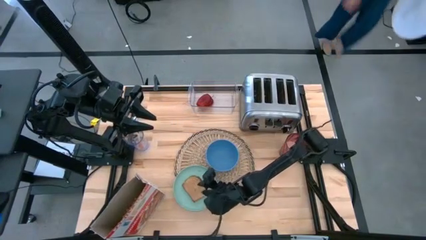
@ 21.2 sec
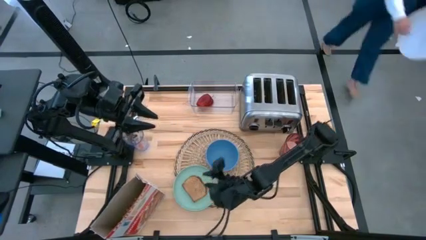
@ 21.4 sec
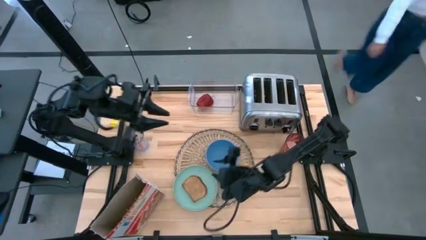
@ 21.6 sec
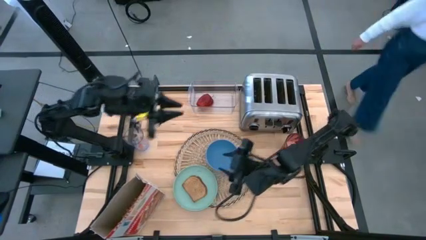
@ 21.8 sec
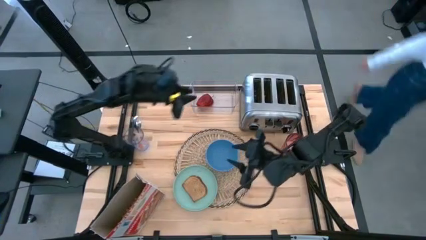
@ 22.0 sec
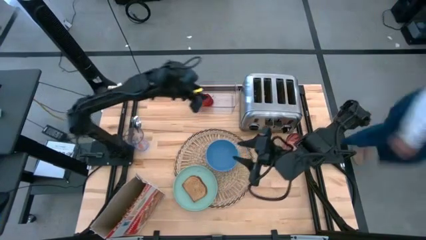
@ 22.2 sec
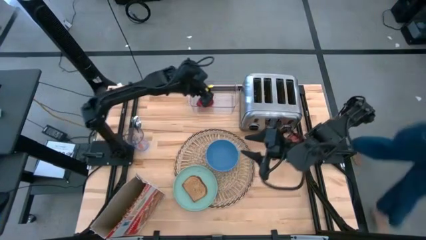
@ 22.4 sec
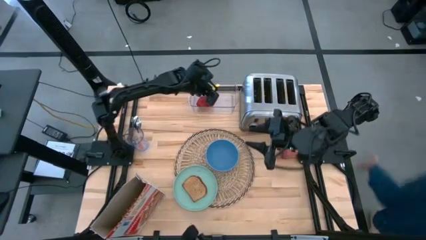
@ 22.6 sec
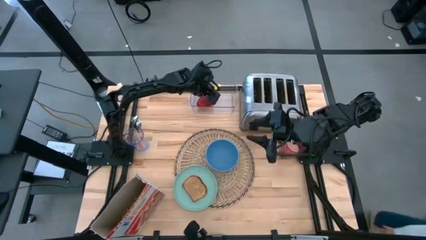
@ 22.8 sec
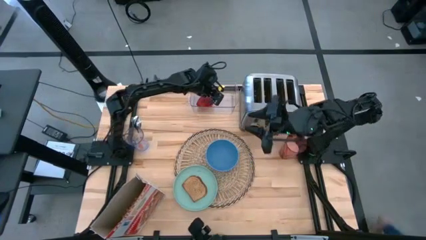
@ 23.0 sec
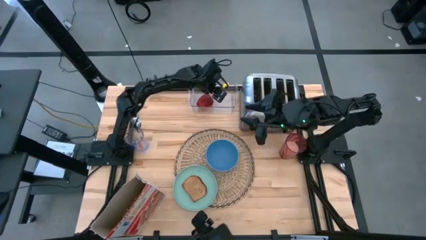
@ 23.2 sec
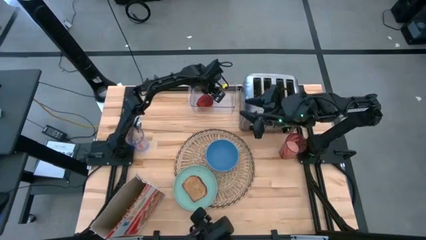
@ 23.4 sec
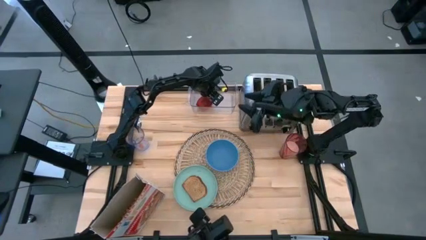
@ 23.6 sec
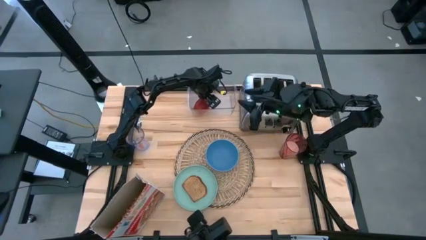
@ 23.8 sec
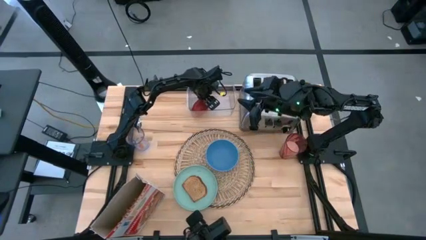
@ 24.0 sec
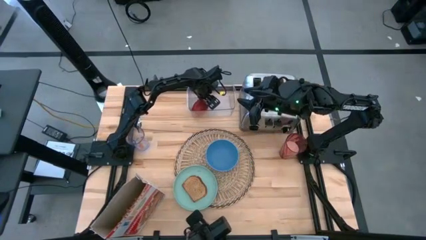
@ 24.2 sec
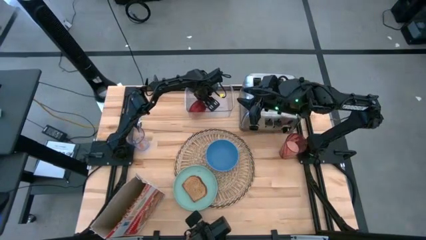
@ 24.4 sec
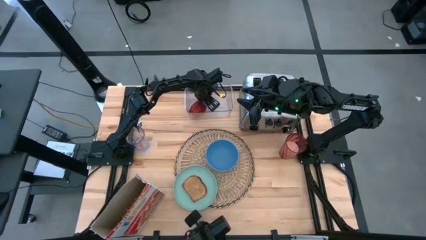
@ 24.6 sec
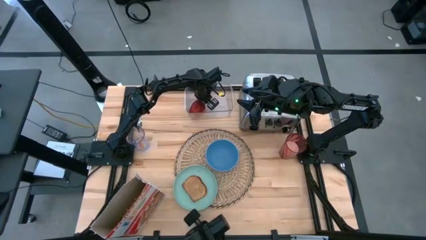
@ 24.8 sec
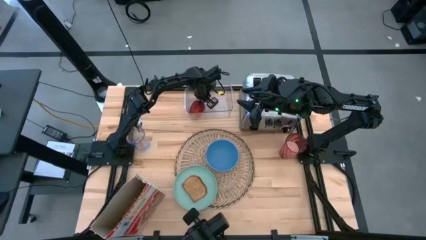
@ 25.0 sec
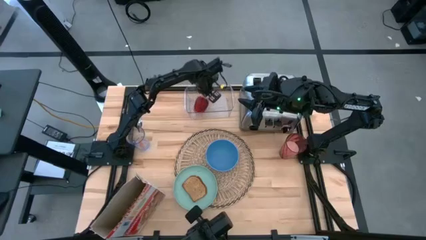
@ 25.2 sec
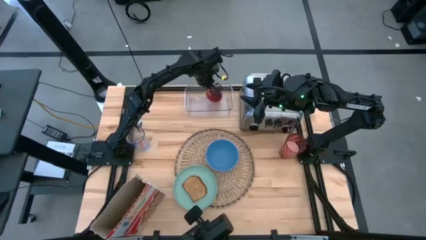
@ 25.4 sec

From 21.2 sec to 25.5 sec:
Task: Arrange a breakfast setting
Put the apple on the brown table mat to the left of the blue bowl

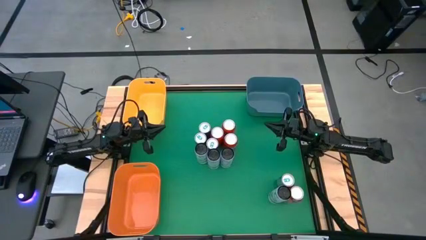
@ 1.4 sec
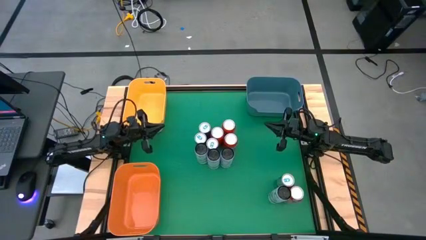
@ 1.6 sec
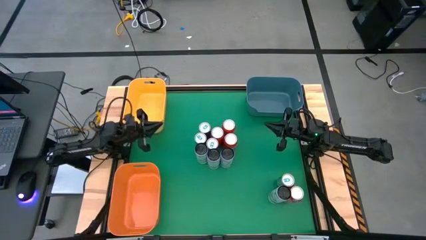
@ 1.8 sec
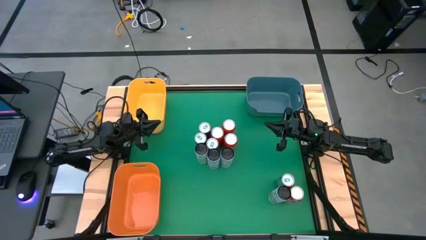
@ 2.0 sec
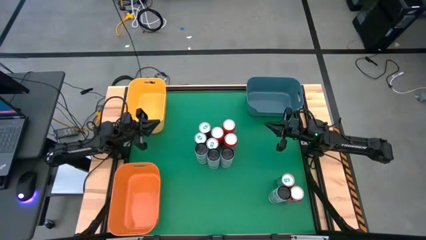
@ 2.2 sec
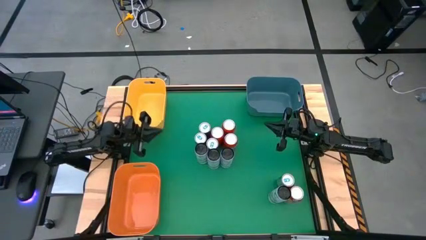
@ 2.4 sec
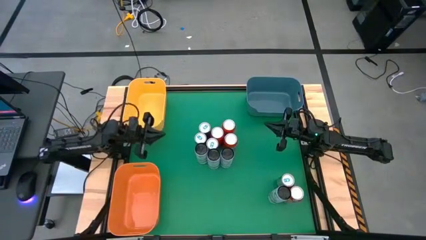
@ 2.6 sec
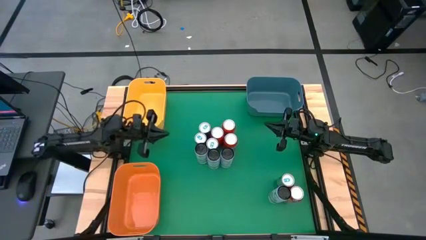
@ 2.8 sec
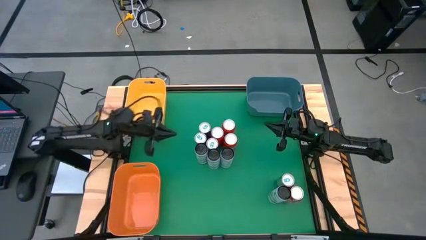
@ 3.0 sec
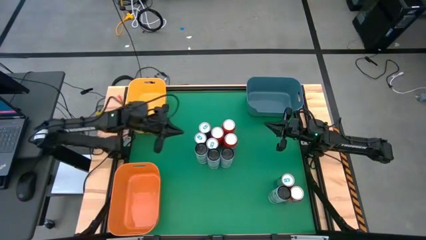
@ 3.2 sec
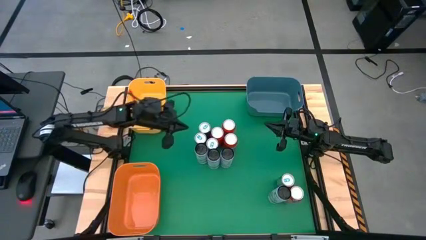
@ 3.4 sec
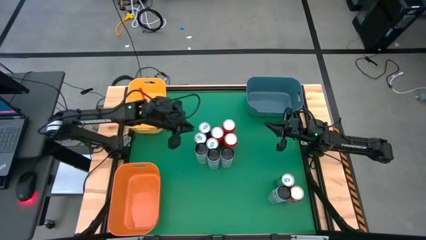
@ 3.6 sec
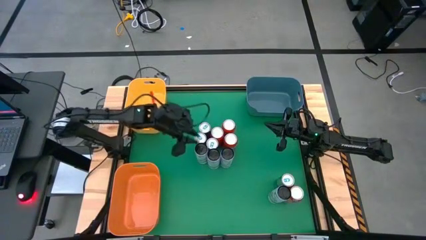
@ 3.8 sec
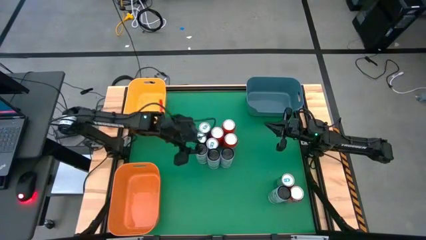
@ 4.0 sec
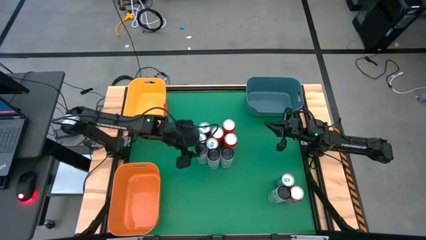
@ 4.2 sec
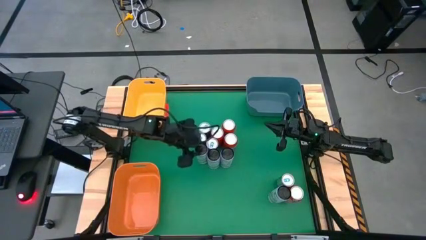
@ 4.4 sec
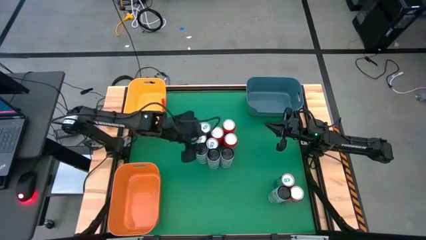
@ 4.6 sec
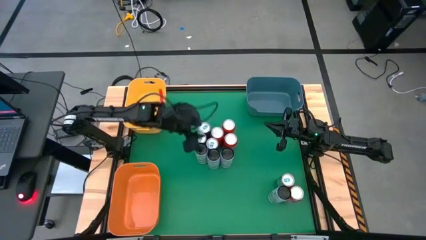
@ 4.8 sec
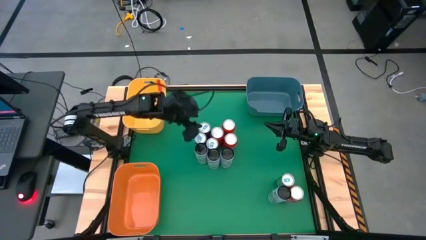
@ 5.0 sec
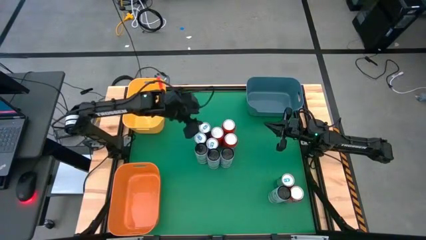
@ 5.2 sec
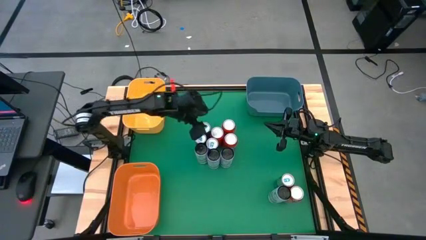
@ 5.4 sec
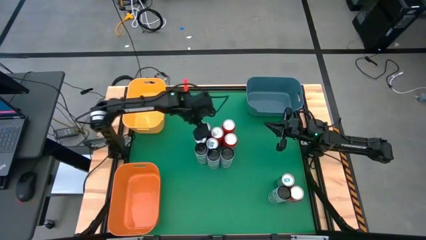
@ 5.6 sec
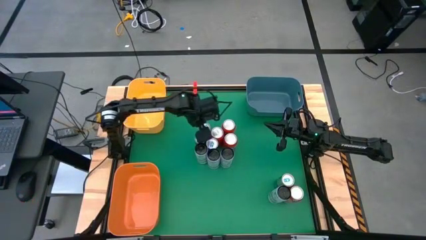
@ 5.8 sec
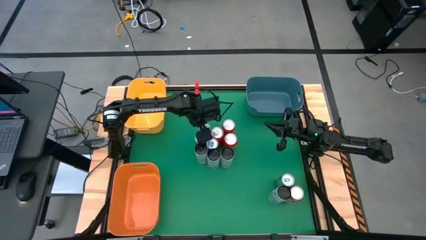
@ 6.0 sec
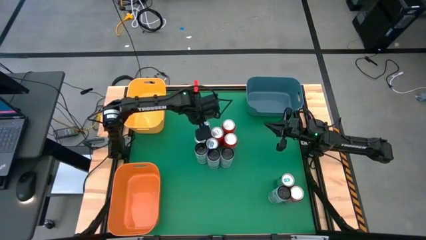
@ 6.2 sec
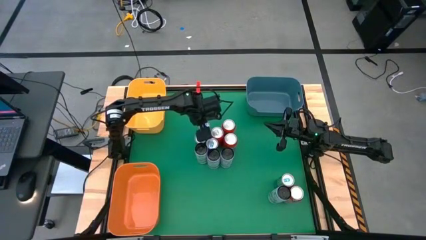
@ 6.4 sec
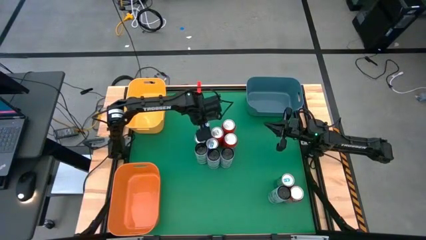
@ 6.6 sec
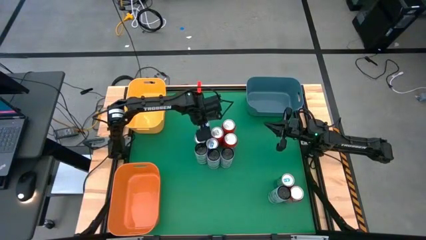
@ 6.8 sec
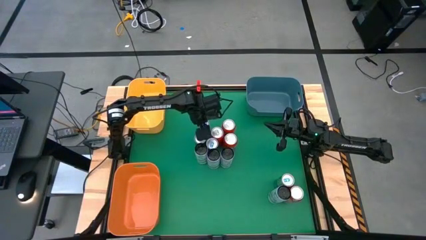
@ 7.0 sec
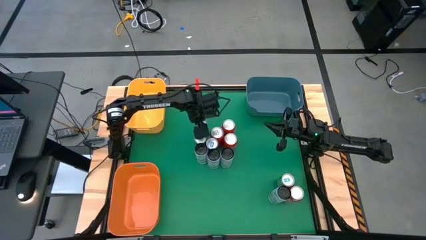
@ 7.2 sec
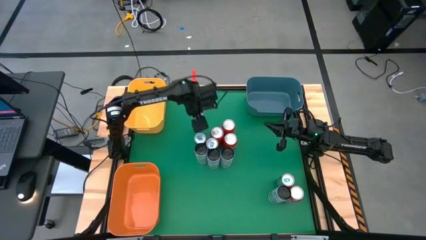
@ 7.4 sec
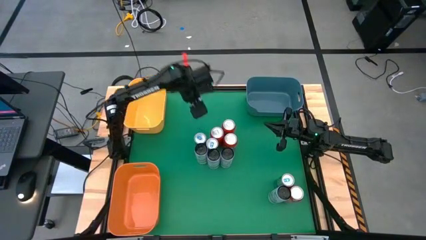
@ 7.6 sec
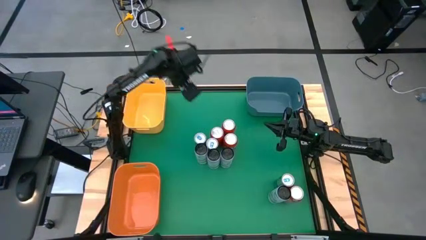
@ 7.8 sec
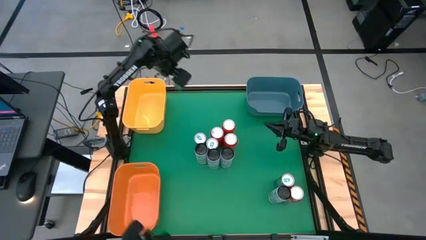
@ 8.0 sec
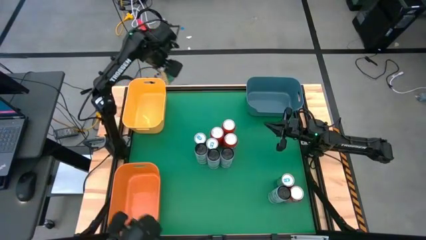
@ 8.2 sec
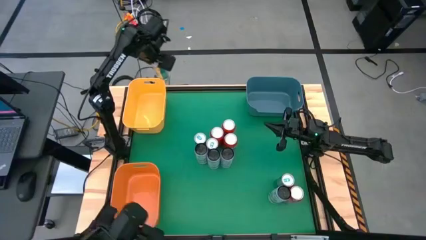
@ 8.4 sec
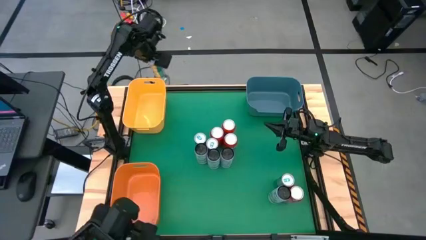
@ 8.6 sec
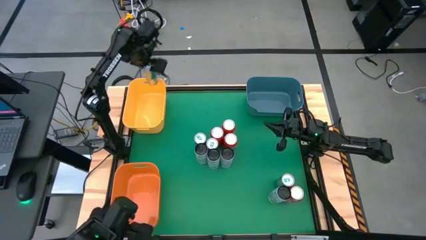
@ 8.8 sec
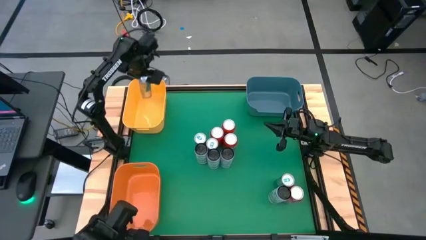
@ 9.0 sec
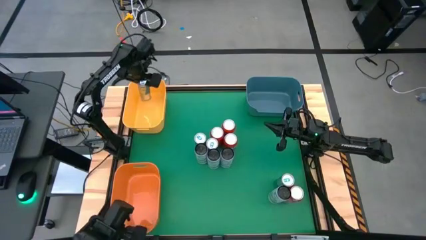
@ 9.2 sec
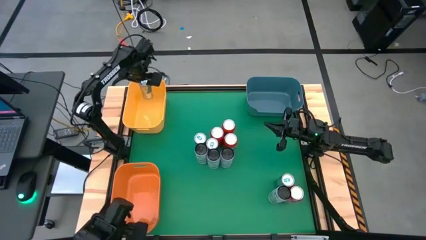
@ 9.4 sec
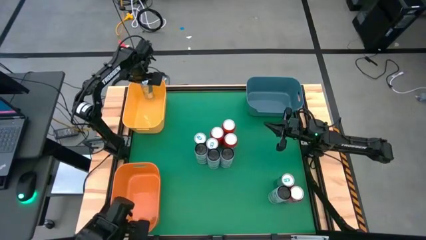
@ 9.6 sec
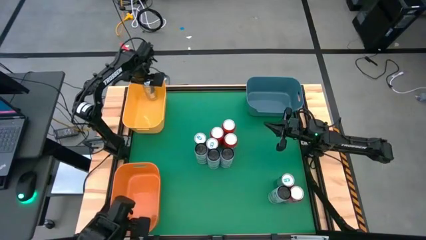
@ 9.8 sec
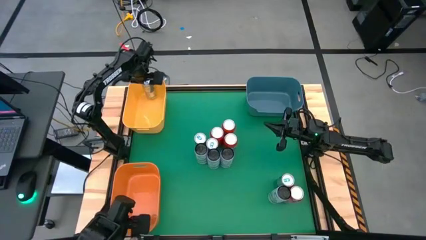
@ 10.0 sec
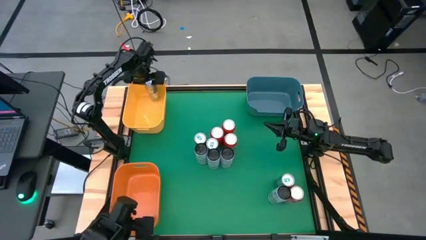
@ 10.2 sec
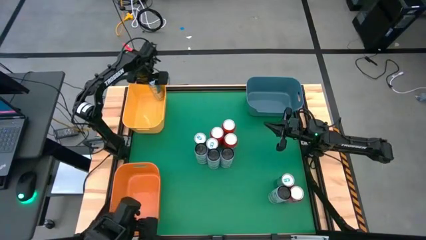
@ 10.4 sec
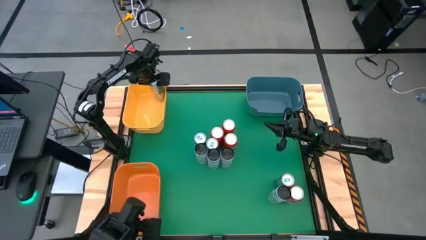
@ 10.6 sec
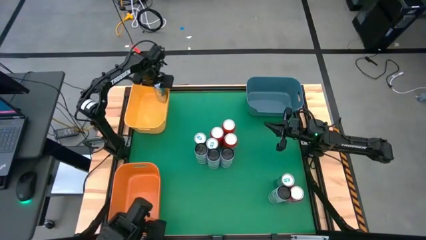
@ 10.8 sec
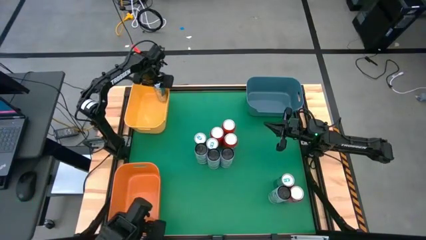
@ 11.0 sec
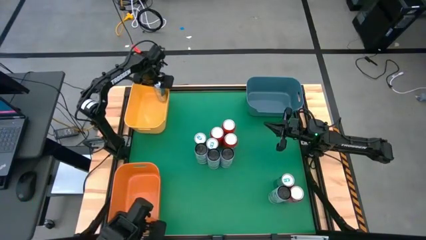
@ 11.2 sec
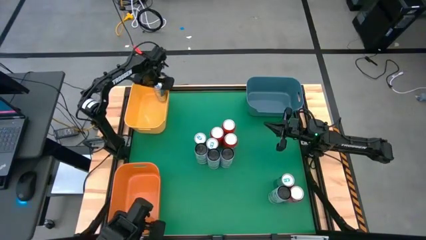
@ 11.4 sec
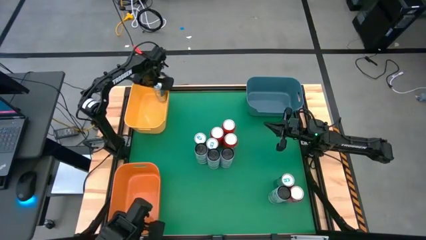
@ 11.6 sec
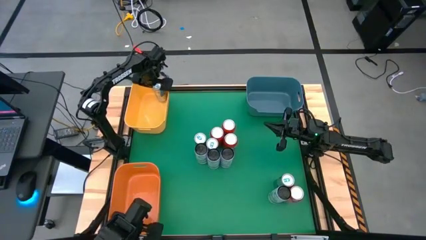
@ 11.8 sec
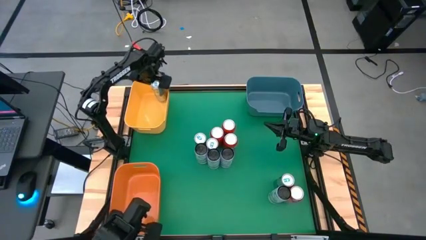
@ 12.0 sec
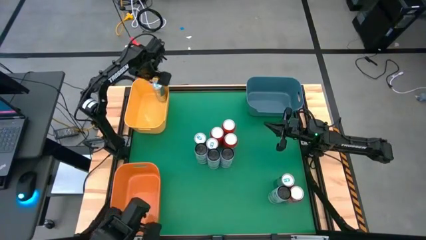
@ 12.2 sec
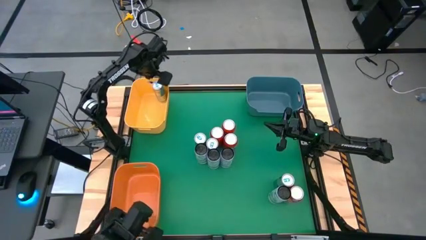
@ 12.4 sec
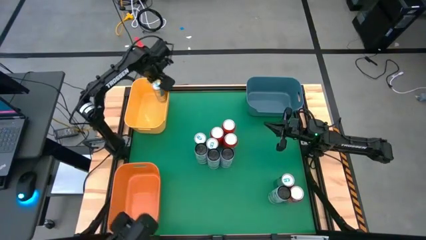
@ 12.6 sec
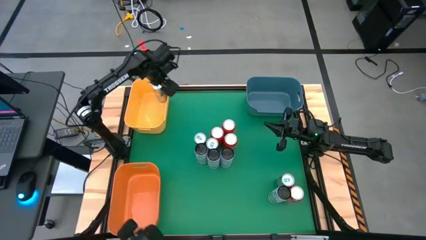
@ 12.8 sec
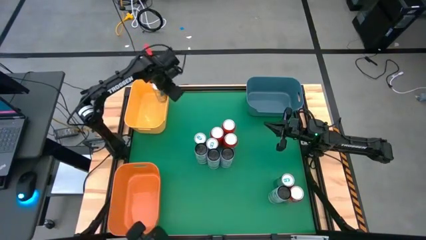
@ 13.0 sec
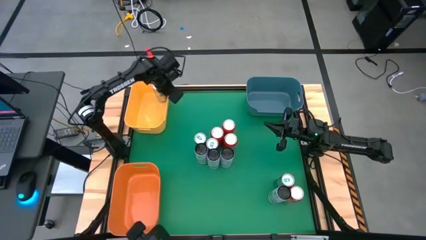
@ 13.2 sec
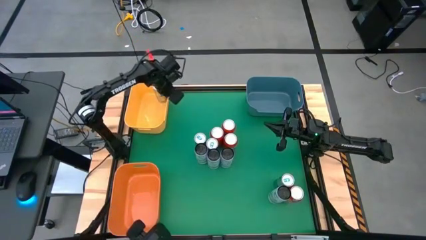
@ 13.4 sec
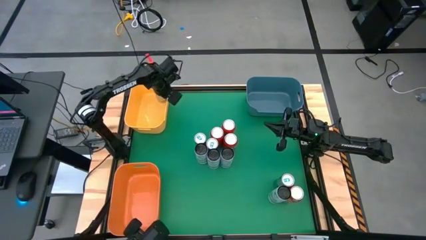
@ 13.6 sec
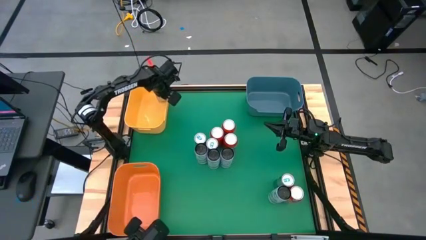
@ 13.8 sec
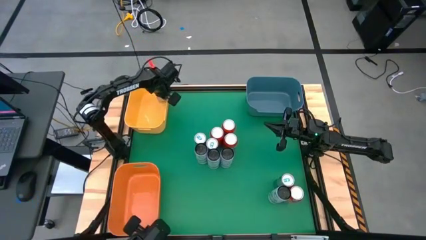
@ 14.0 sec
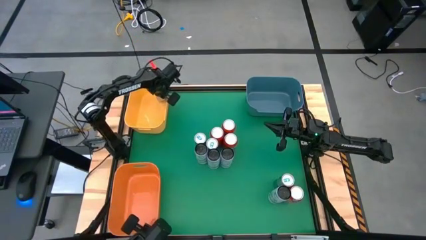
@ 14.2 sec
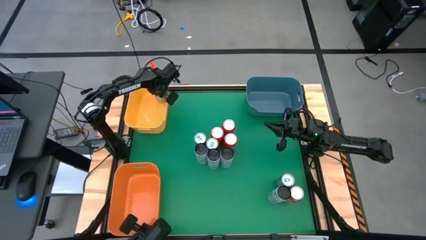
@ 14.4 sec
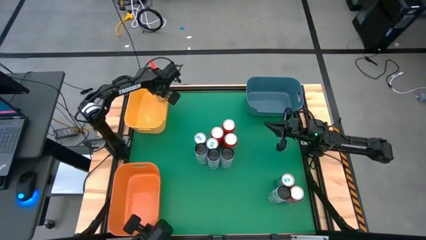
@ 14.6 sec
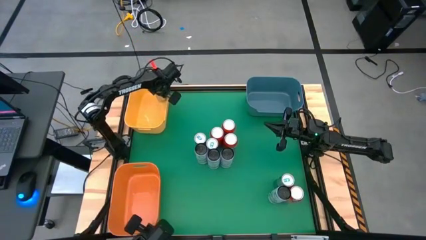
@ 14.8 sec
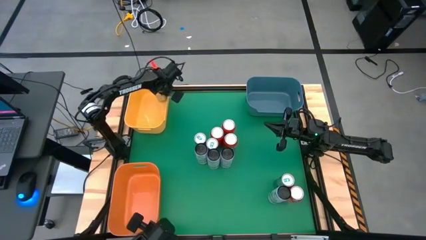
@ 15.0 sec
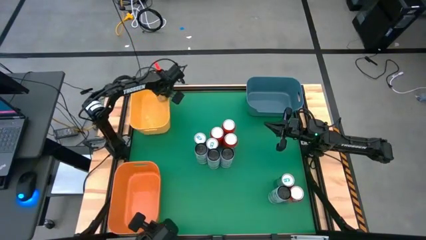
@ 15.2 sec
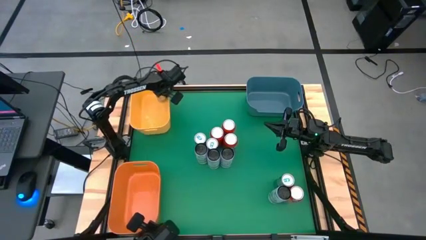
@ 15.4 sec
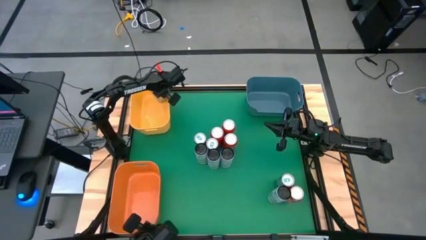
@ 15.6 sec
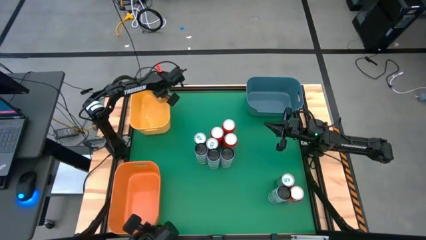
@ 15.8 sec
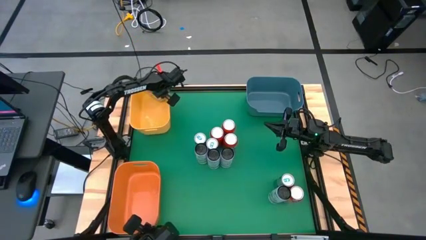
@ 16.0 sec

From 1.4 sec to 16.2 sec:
Task: Sort soda cans
Put the blue soda can into the yellow bin
